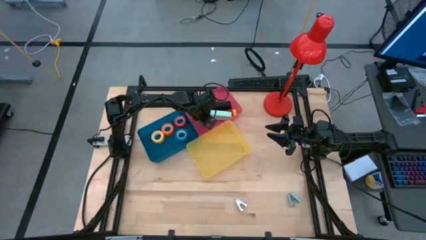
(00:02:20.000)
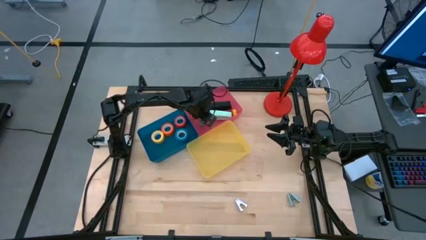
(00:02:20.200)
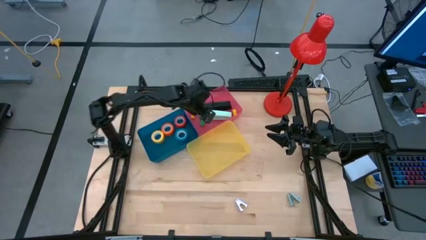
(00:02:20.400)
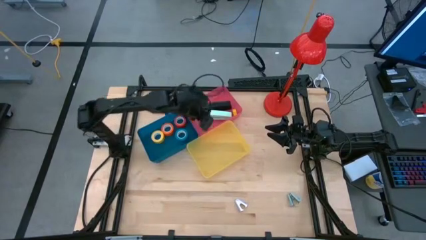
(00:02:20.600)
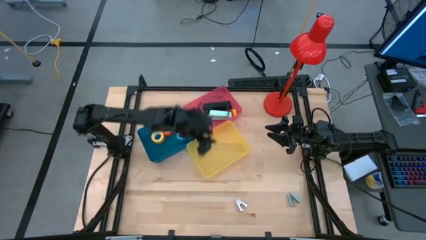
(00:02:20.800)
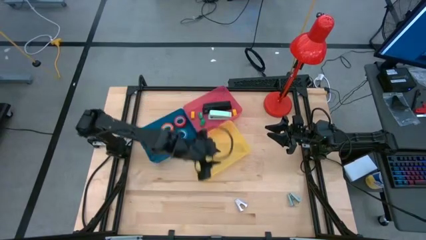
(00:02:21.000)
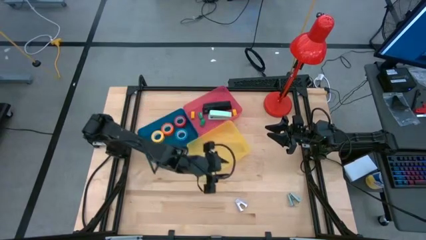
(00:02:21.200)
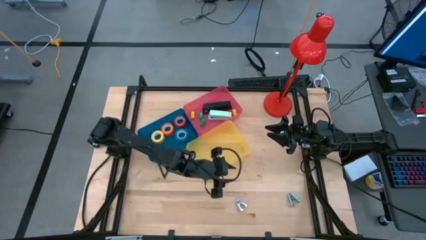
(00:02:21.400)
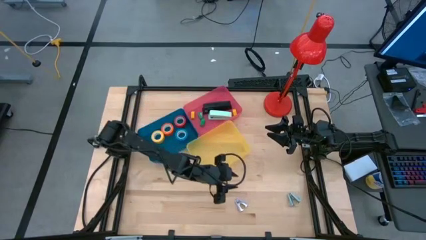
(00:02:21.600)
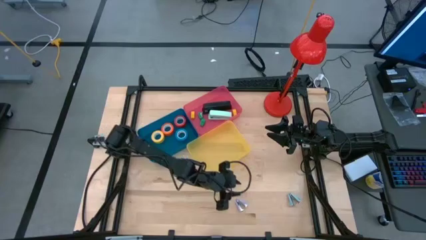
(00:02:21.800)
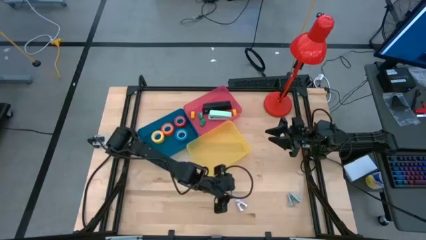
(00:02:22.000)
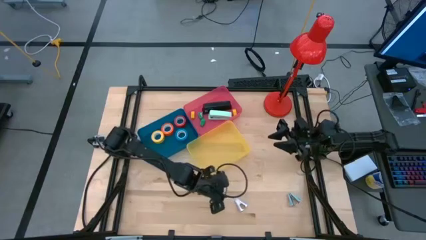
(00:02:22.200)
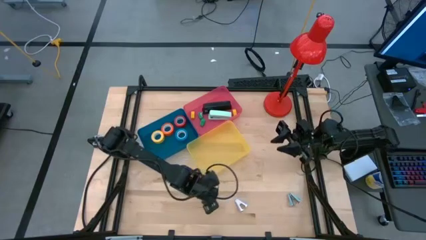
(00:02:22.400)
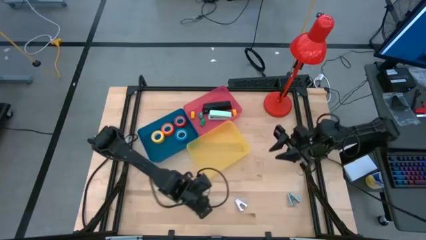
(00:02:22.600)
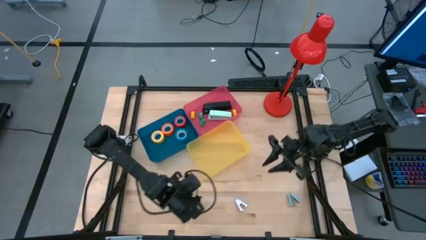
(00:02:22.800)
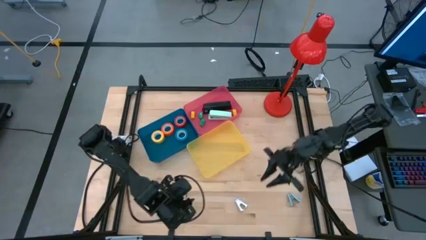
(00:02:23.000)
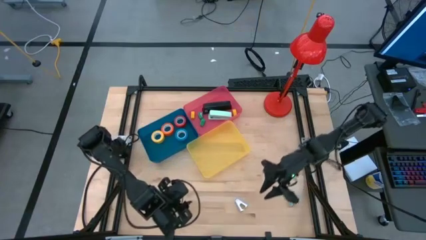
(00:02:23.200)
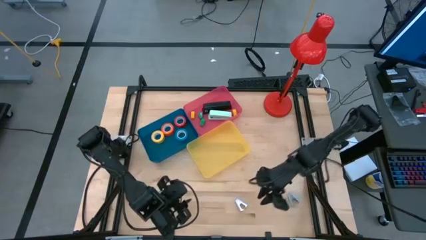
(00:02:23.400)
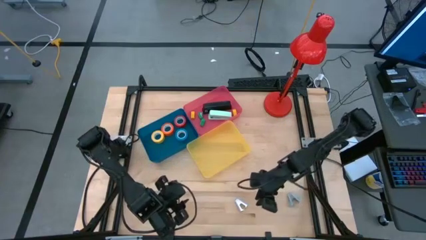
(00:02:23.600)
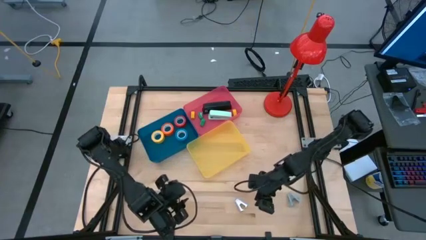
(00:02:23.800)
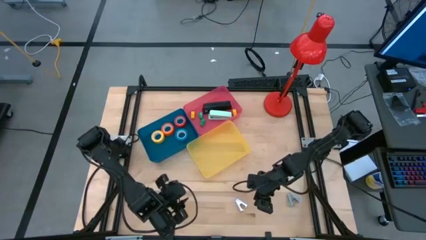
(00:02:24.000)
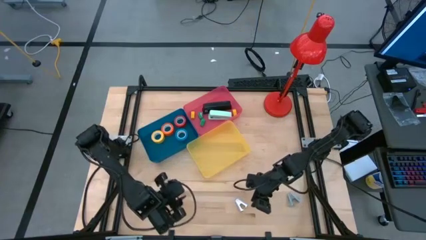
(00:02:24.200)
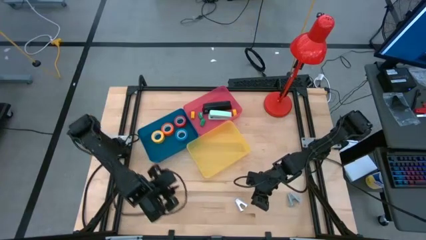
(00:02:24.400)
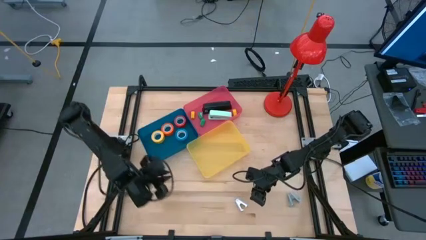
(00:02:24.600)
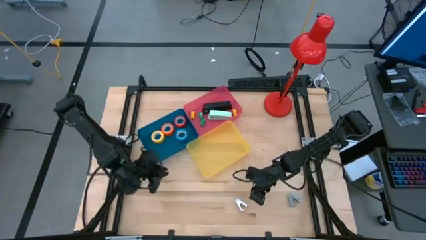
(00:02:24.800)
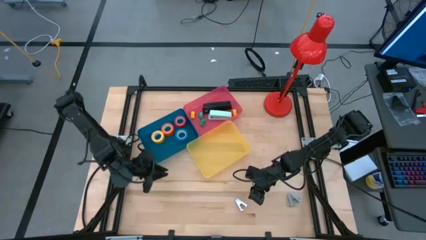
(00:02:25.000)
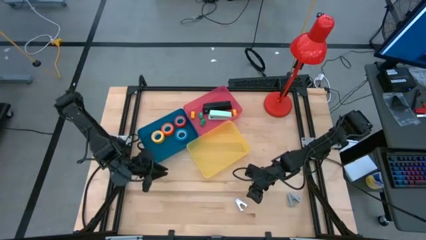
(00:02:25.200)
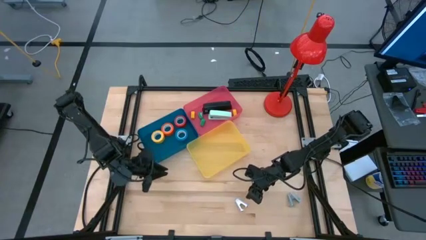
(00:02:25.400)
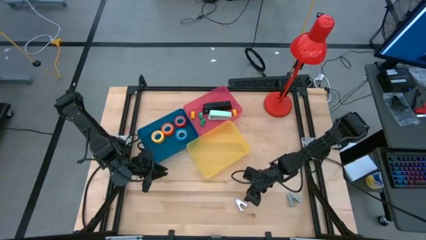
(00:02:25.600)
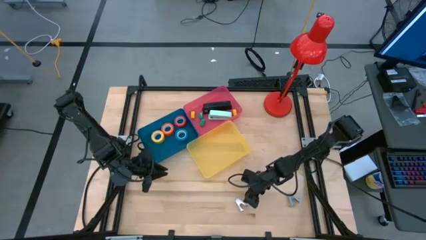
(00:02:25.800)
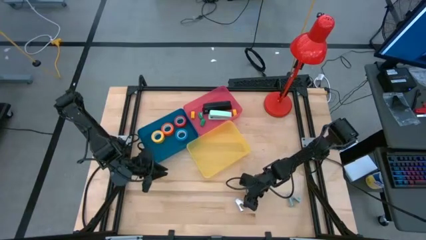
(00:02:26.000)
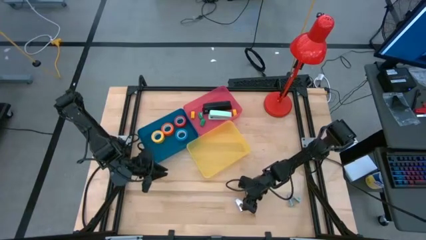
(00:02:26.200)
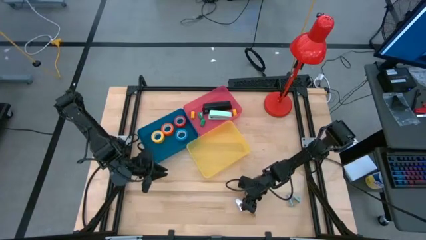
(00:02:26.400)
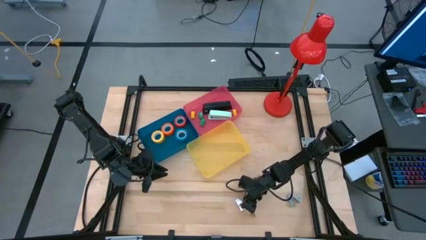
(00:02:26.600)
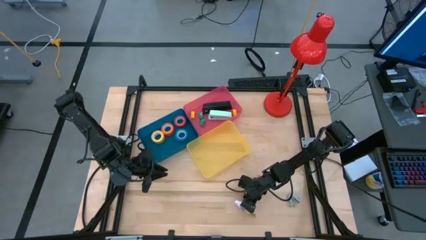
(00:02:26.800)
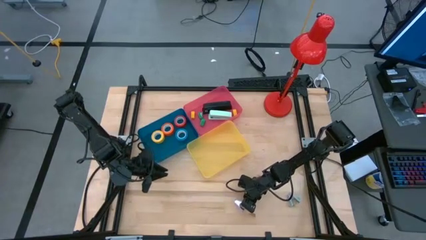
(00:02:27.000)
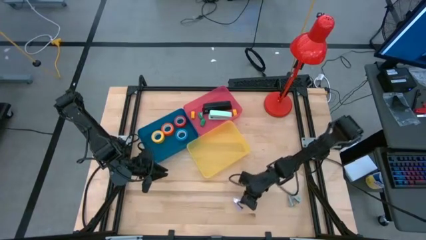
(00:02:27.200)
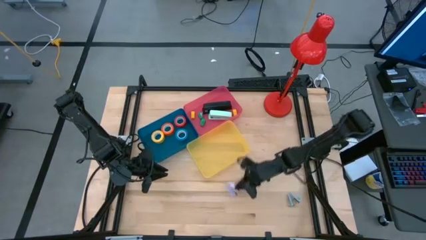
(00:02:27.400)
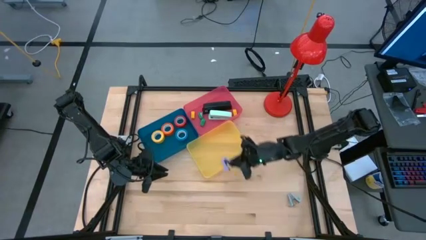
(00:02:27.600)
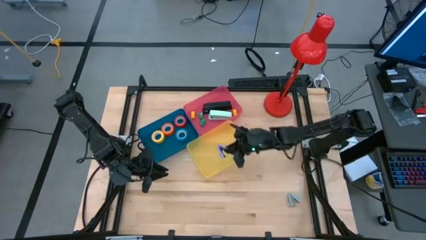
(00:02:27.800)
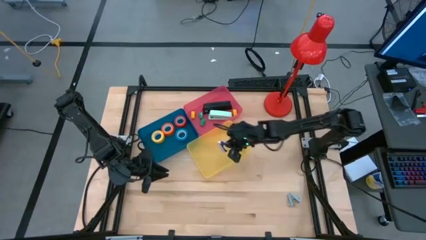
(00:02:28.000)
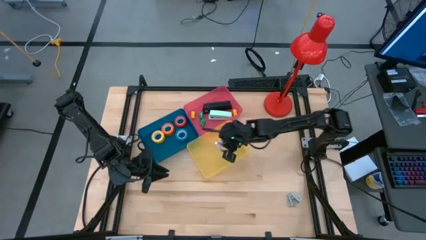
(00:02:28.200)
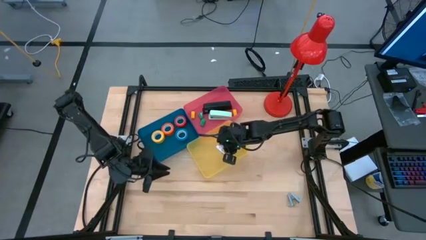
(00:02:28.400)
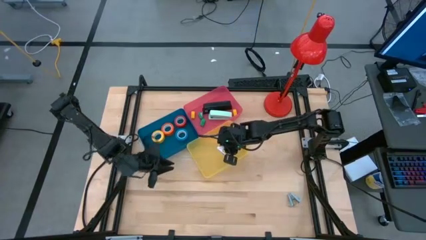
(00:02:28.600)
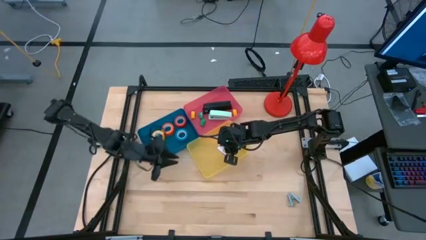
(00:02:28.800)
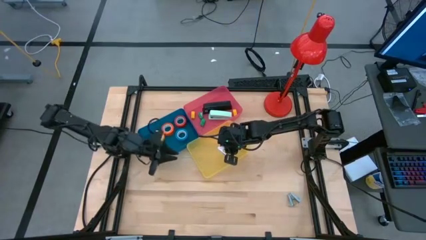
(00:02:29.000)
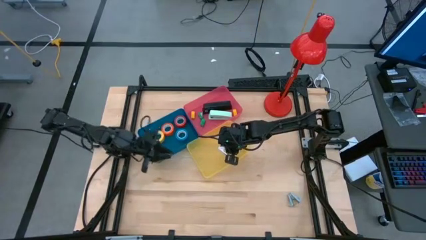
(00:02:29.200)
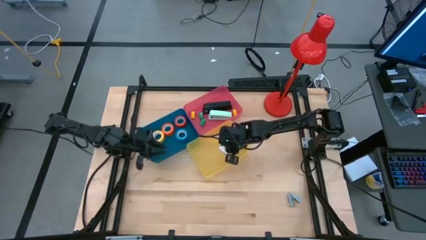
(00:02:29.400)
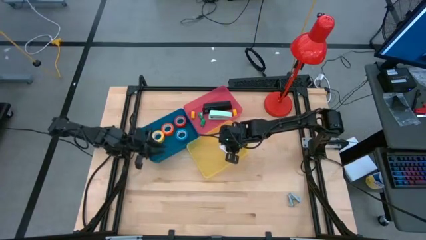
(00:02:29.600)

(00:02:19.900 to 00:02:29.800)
Task: Pick and place Stapler, Stapler remover, tape
Put the purple staple remover into the yellow bin

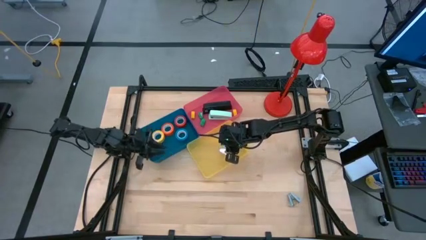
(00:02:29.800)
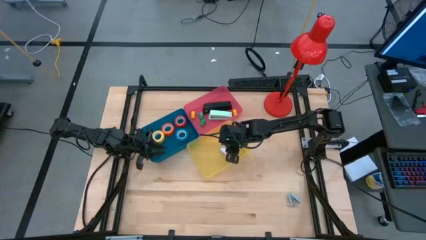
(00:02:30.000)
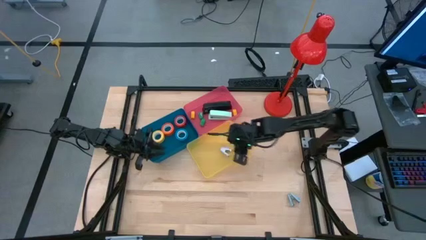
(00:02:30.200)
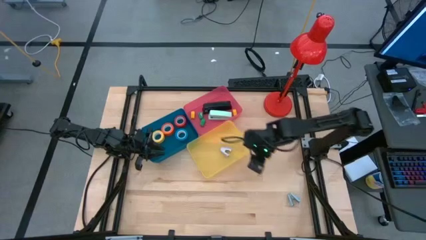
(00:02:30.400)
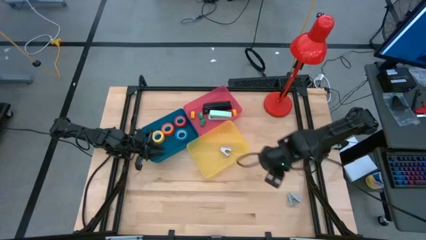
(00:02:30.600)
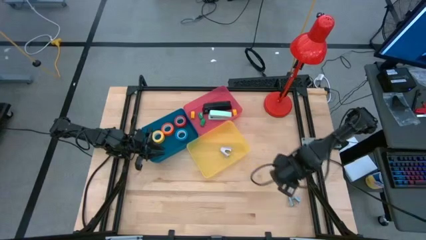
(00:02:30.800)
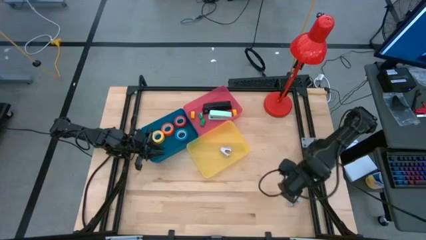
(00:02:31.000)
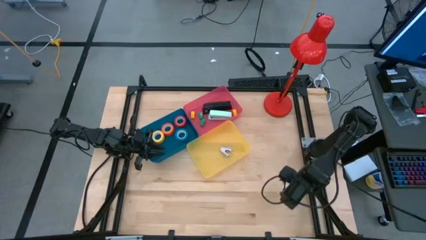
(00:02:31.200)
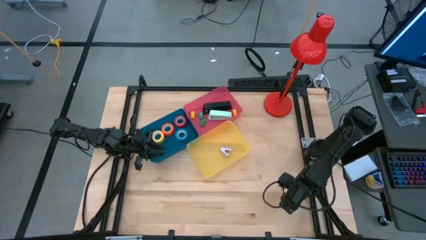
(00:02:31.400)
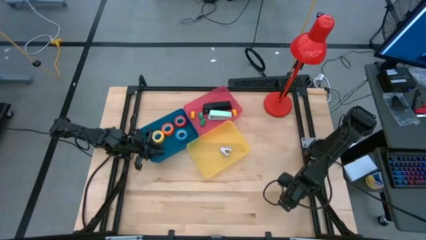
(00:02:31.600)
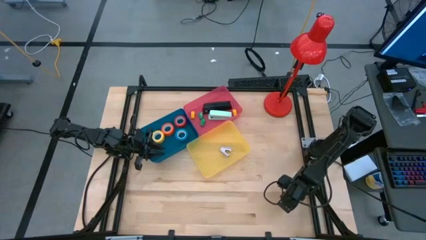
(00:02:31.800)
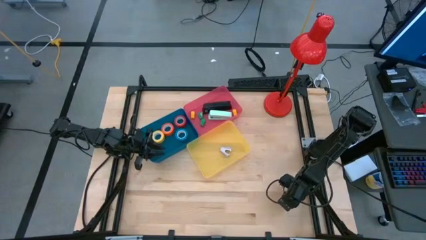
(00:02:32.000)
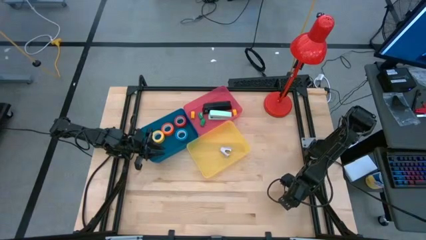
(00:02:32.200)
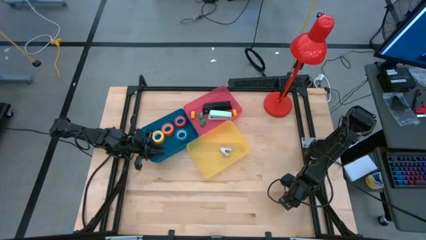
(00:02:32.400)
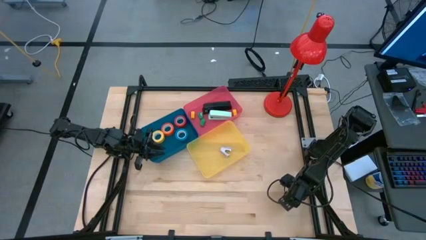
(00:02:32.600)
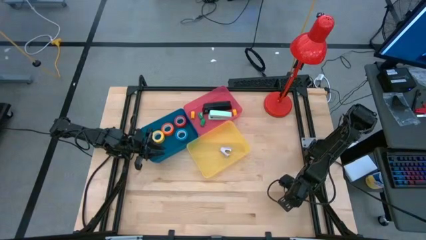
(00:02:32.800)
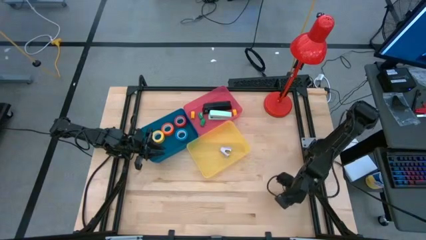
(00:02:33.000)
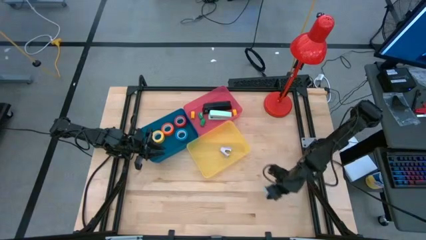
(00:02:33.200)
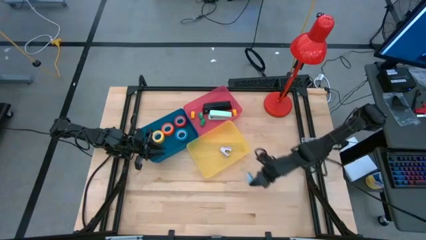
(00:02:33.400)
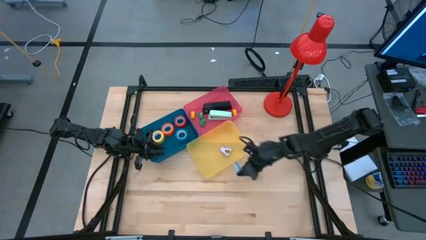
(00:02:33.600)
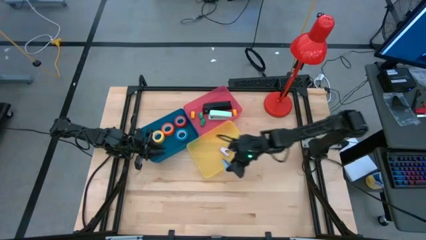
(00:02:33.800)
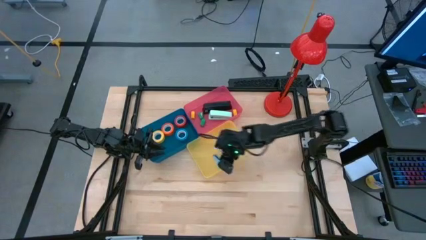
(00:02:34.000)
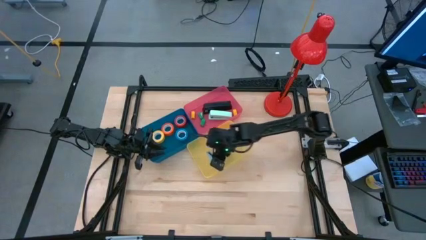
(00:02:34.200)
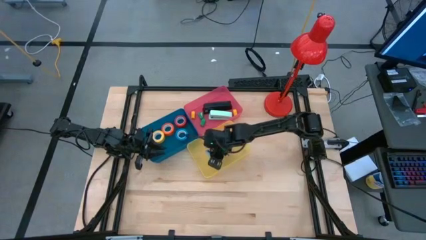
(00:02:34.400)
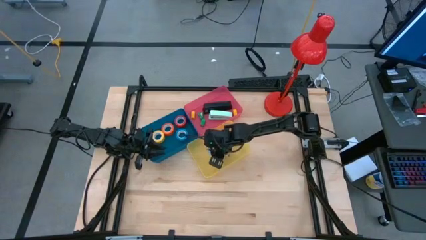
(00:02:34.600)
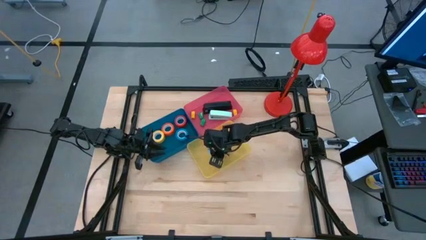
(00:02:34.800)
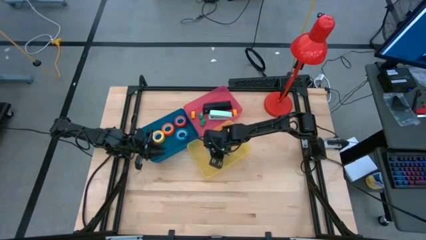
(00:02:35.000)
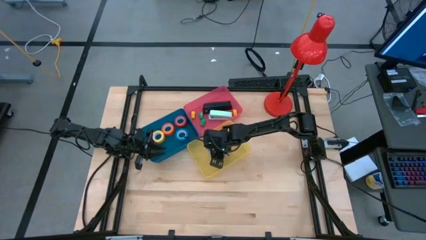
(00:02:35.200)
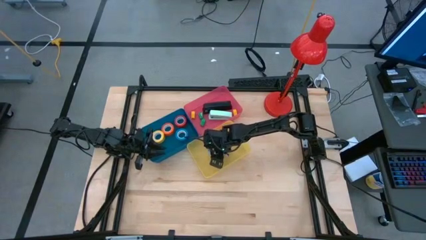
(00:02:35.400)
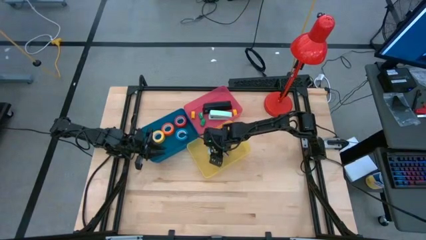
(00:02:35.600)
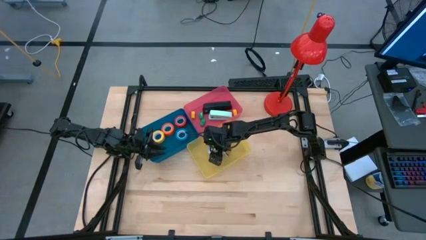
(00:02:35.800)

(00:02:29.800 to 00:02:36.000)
Put the light blue staple remover into the yellow bin
